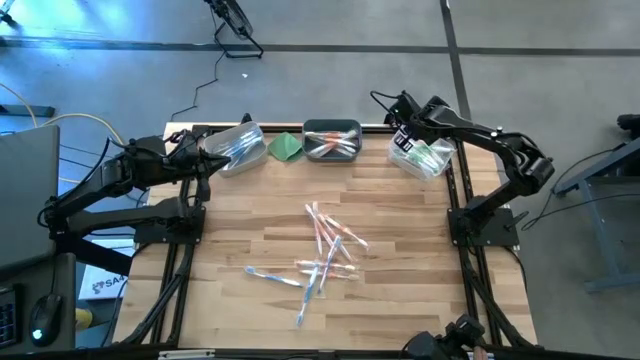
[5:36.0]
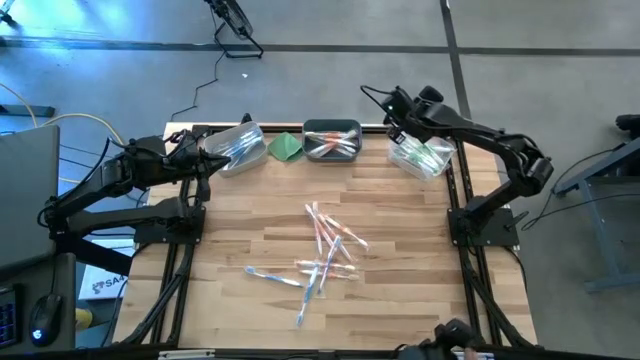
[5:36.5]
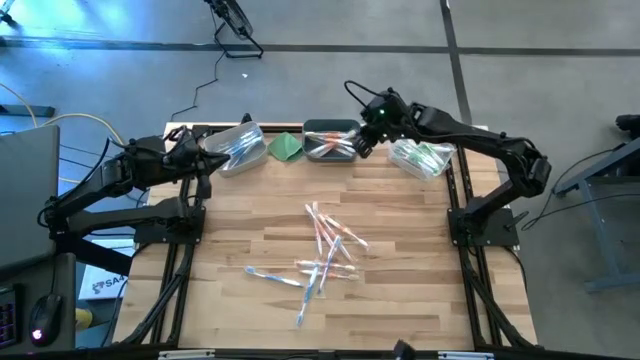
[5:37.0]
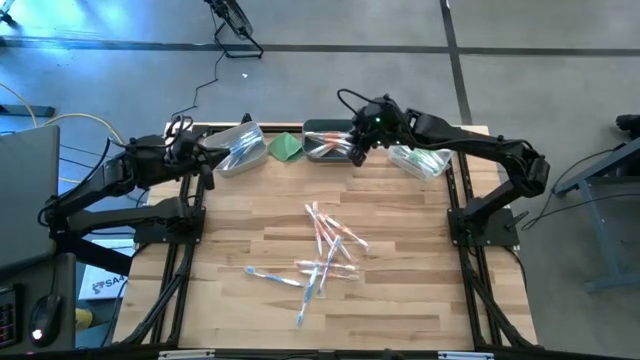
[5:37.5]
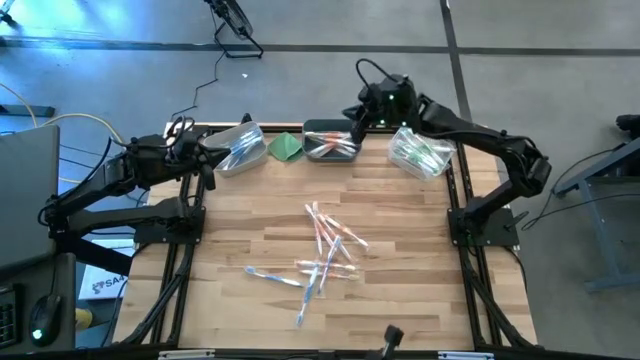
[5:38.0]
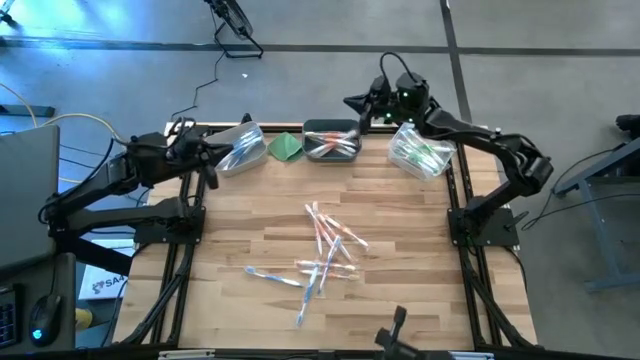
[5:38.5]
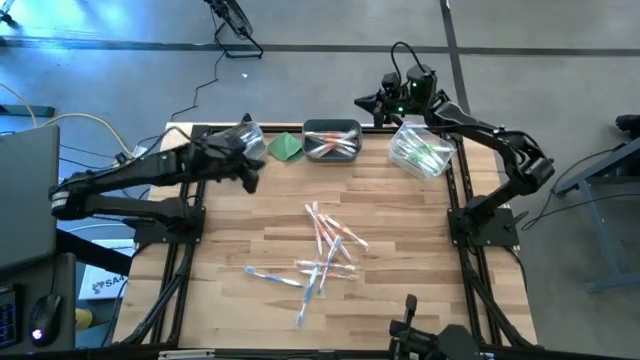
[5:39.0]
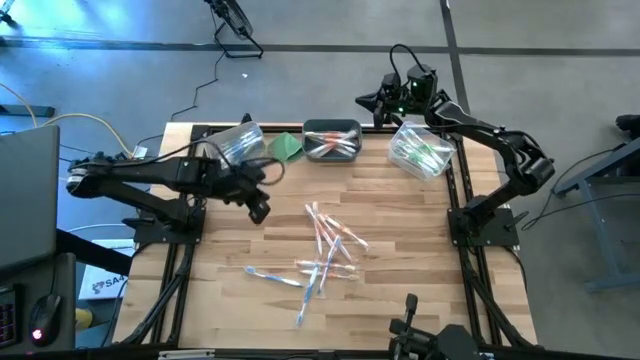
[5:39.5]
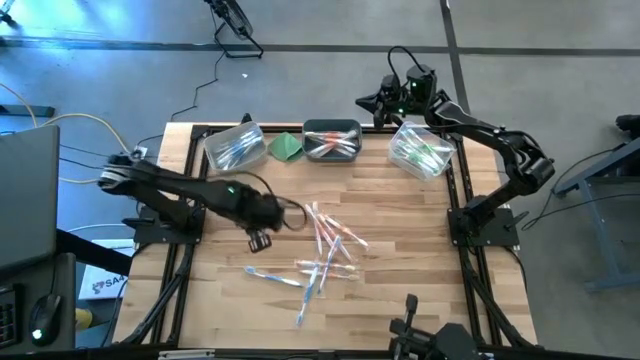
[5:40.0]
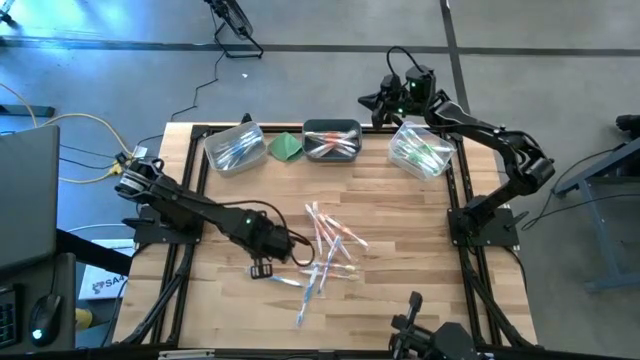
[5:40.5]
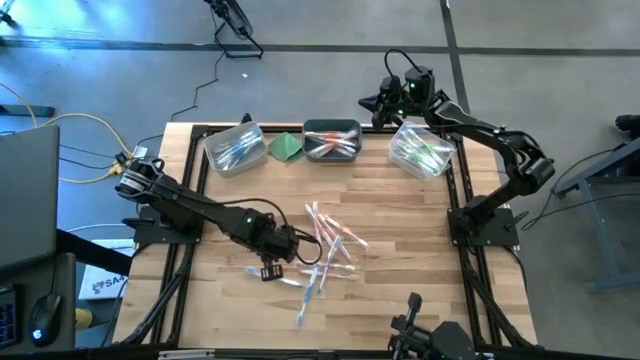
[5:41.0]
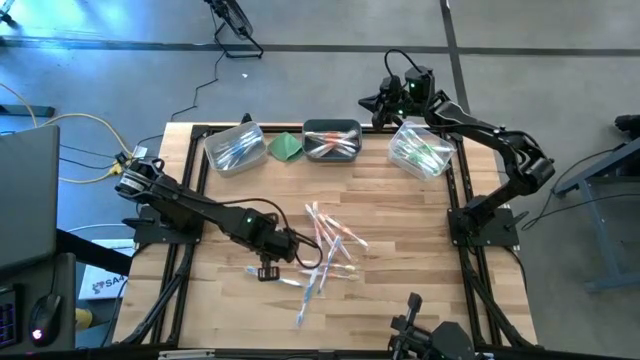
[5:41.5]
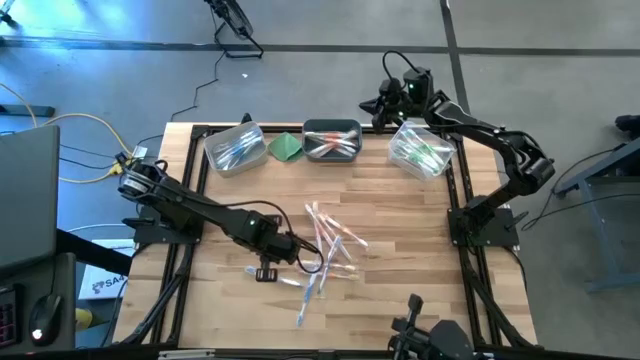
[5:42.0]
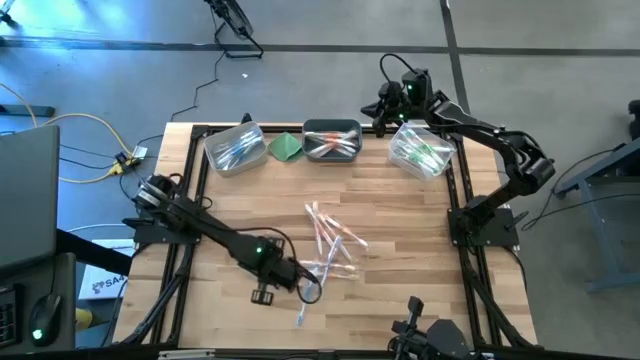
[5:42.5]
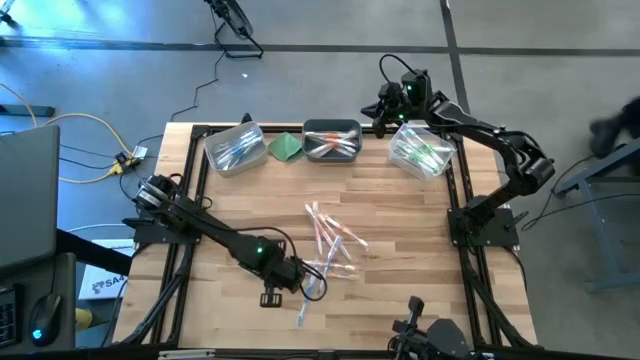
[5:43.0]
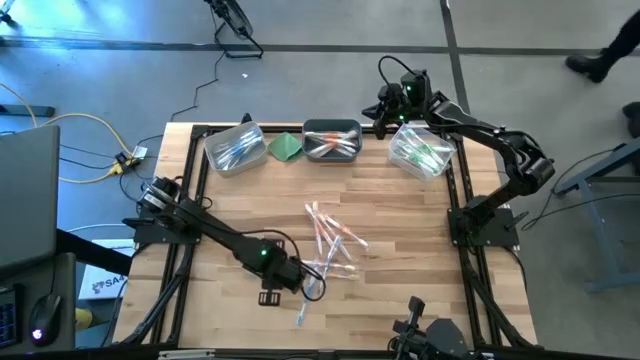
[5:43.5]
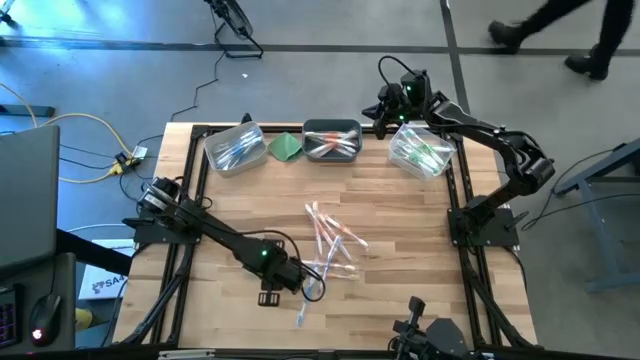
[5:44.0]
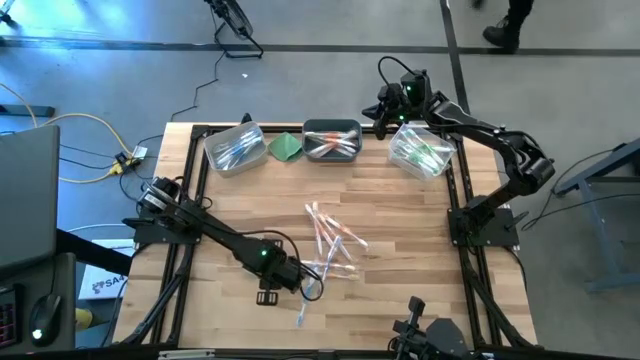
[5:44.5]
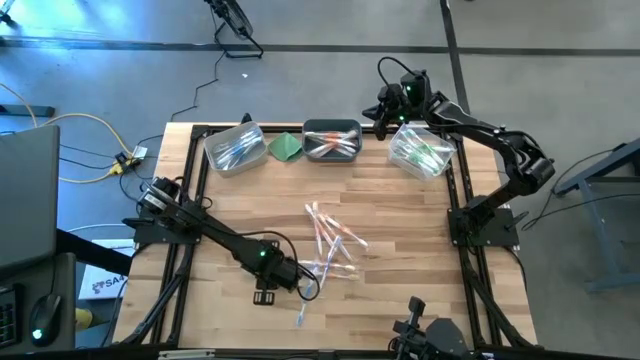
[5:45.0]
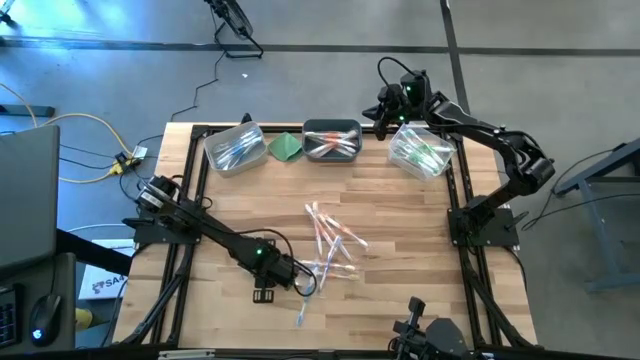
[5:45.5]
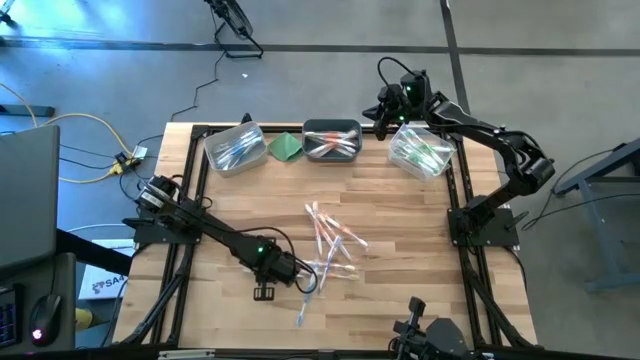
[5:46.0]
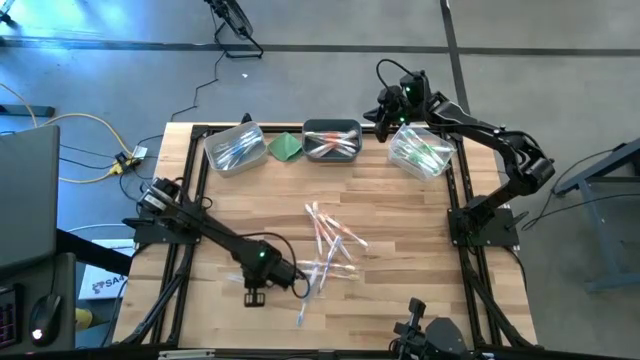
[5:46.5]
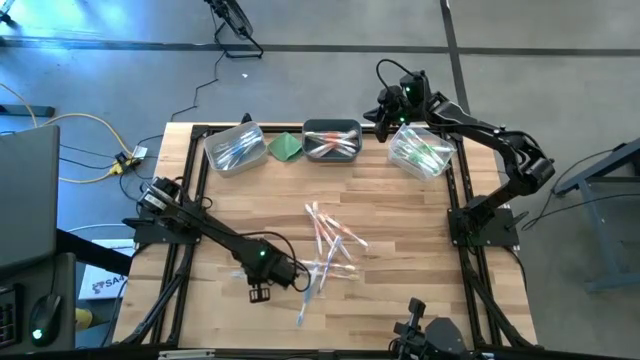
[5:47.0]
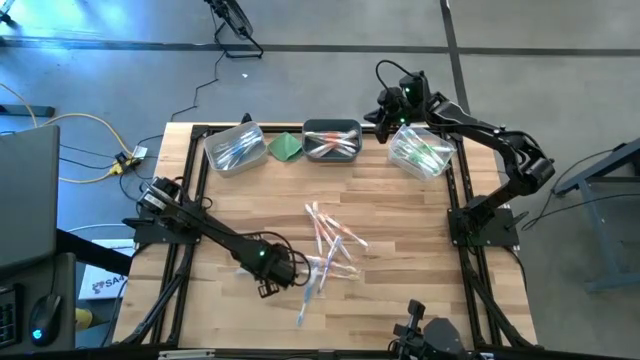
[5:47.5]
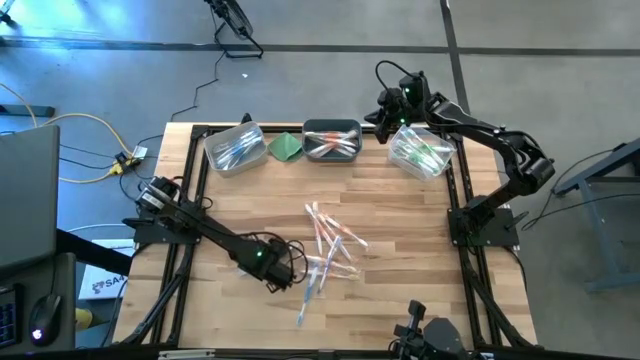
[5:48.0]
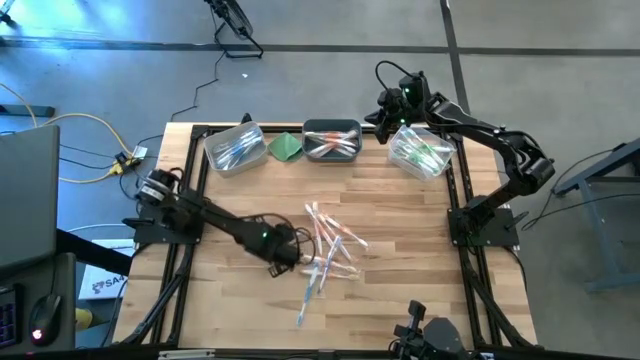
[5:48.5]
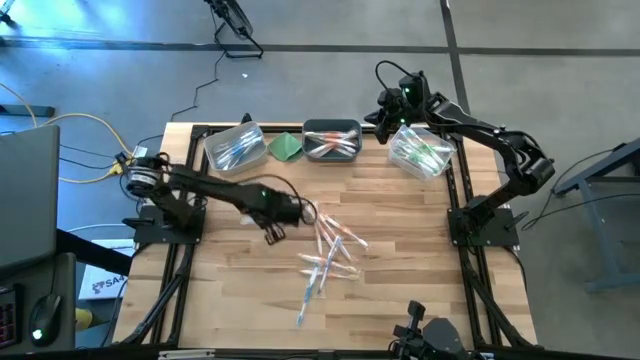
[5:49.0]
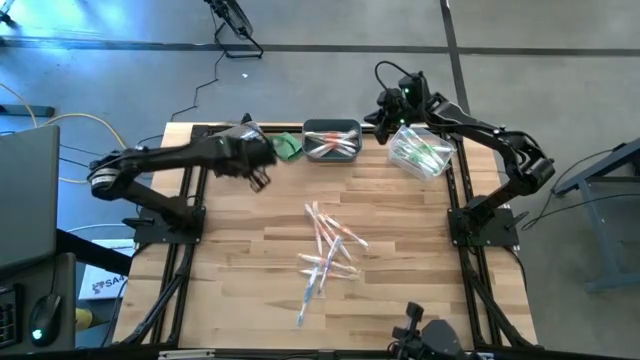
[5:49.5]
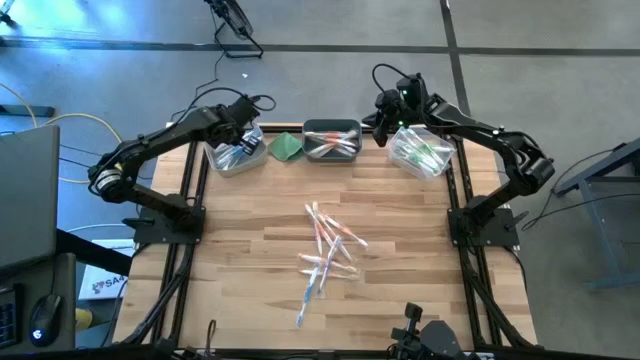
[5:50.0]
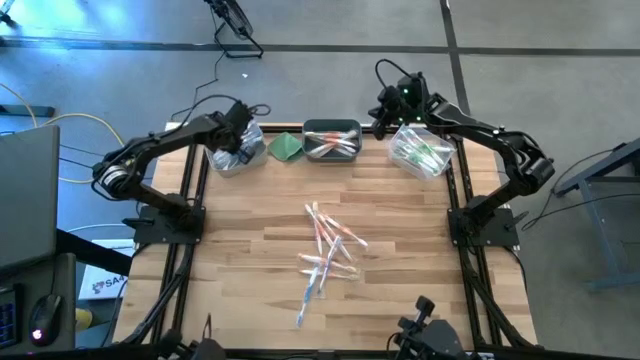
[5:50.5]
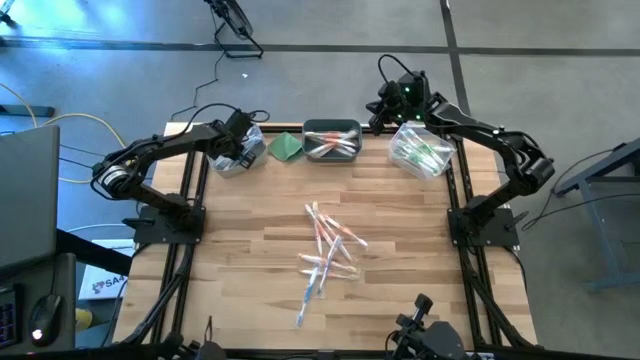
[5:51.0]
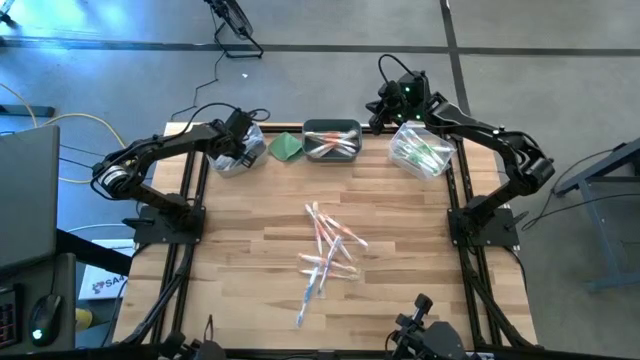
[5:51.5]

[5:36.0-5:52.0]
Task: Pick & Place Toothbrushes
Put the bottom left blue toothbrush into the gray bin
